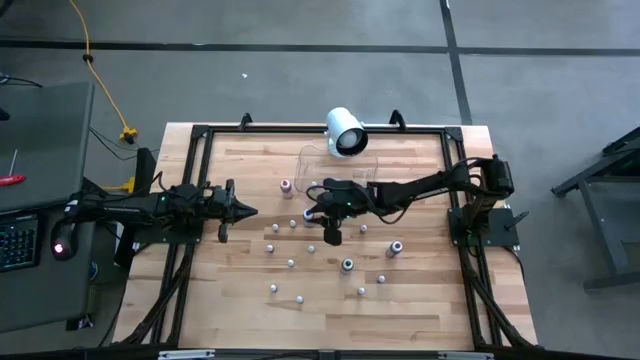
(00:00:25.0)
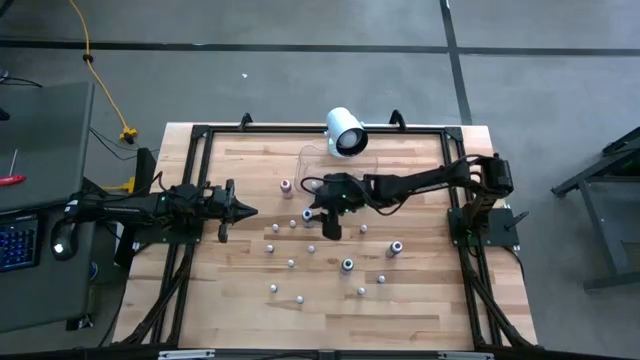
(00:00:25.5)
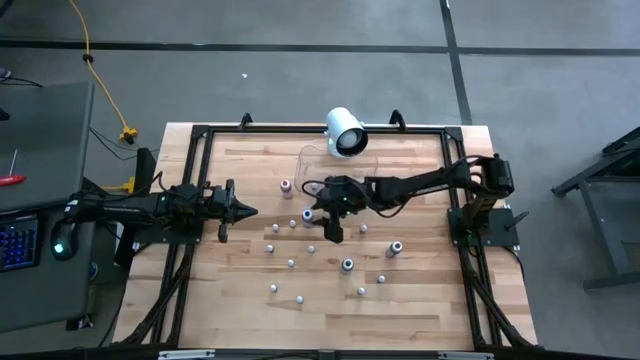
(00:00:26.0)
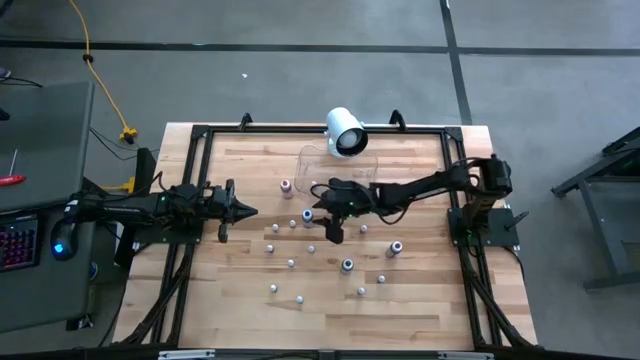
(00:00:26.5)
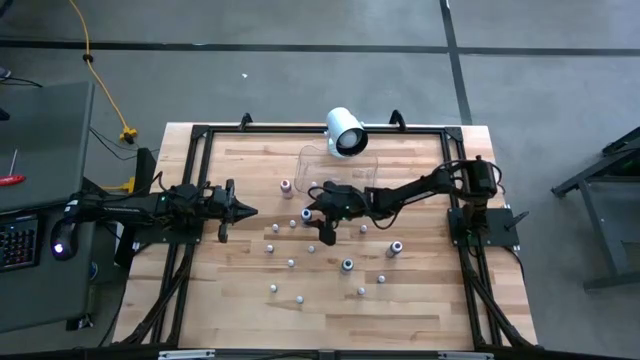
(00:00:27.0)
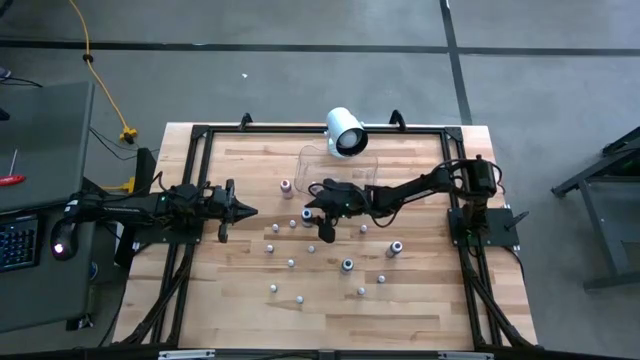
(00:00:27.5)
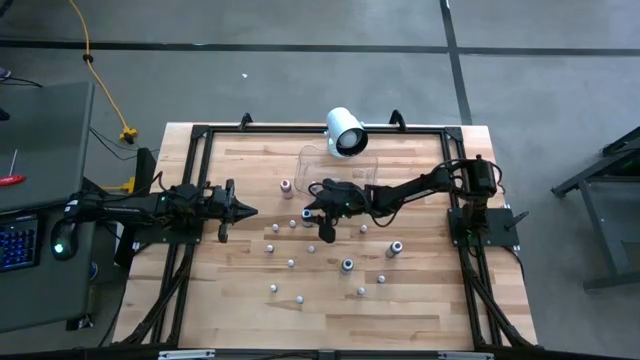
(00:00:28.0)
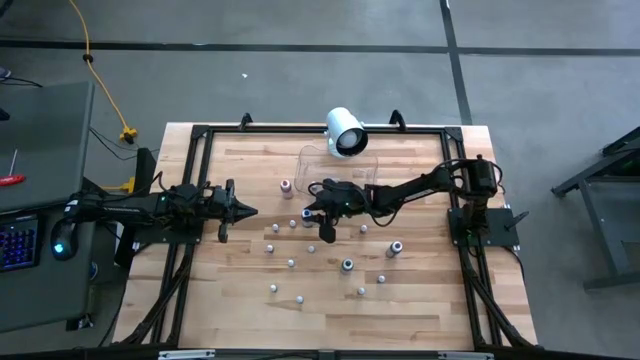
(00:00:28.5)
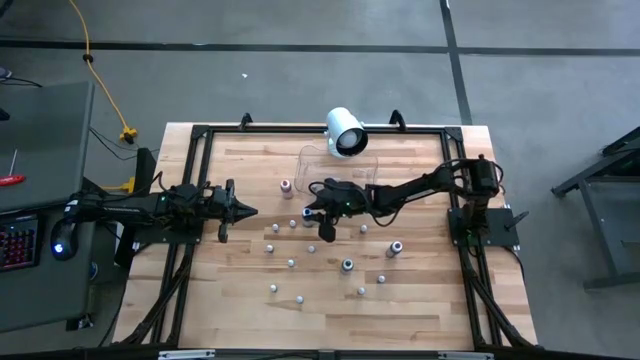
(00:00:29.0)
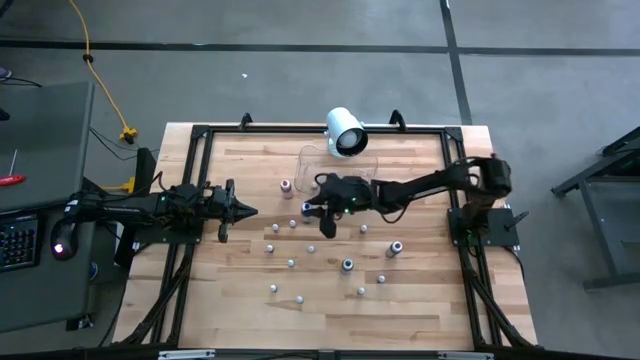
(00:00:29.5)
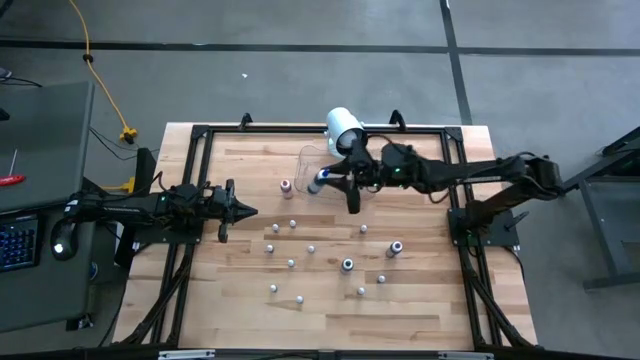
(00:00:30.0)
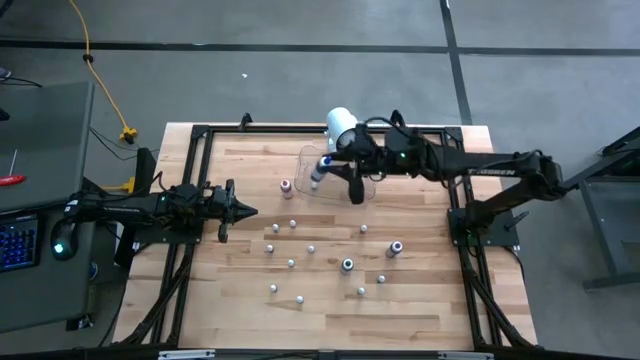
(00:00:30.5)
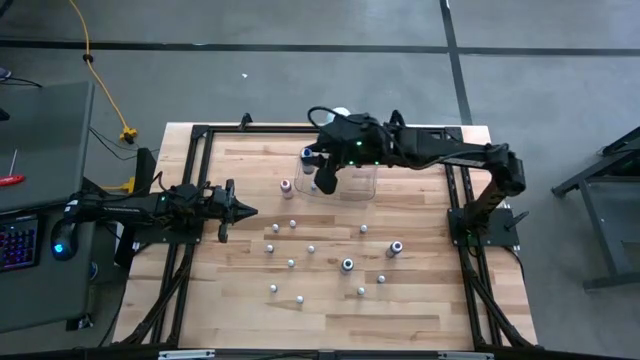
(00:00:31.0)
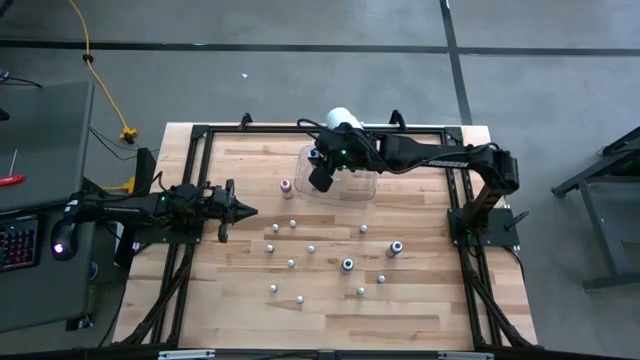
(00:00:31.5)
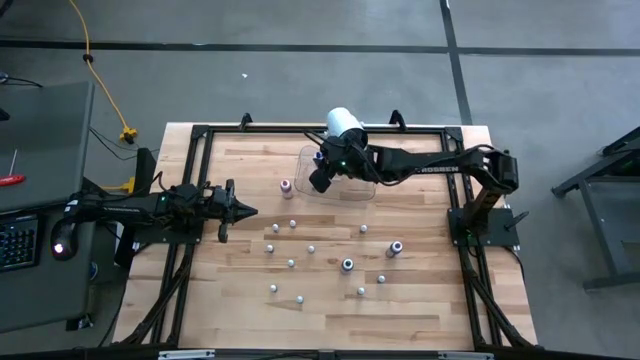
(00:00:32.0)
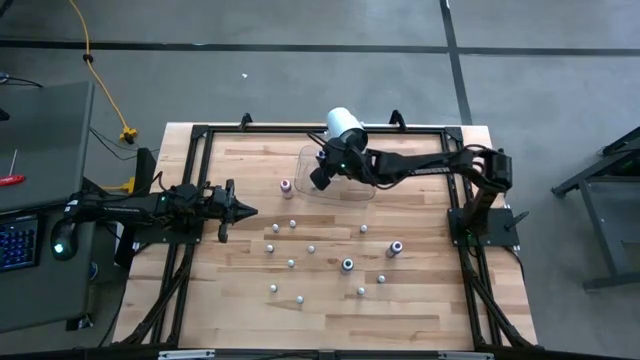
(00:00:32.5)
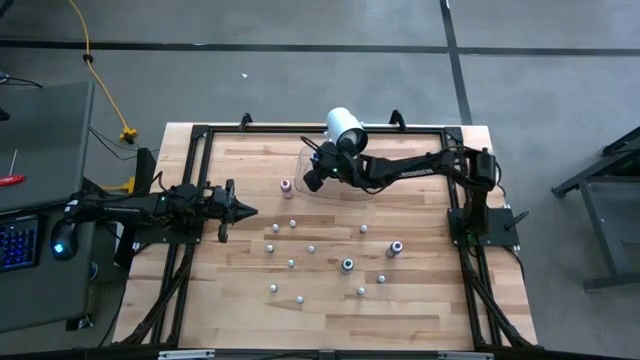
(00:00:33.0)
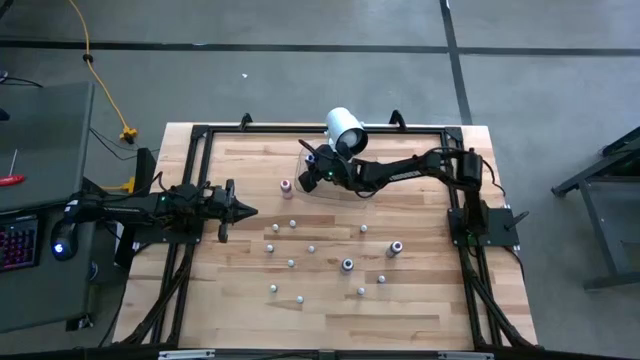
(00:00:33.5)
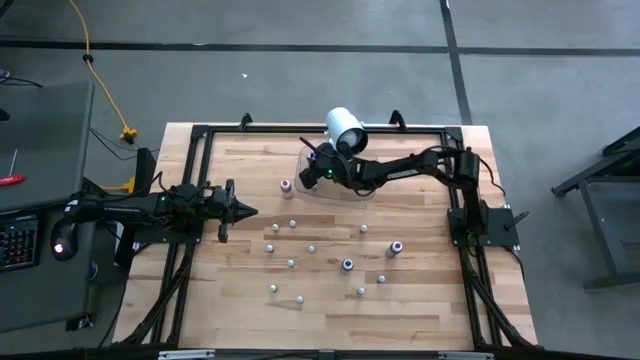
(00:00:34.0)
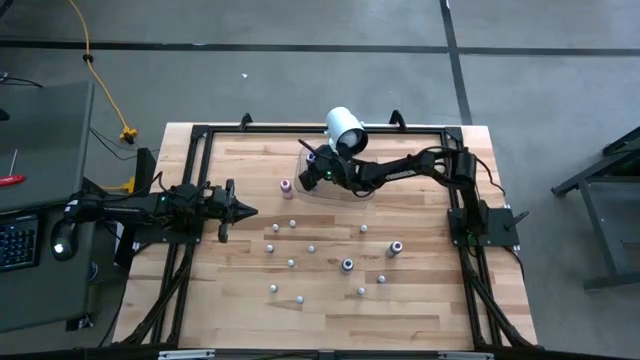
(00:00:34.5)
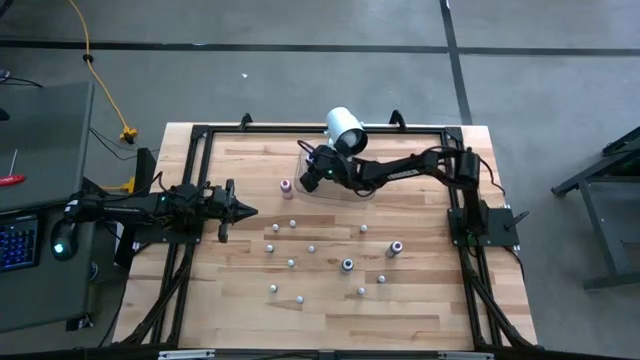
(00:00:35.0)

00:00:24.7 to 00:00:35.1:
Task: Pick & Place food coloring
Put the large blue food coloring bottle into the transparent bin

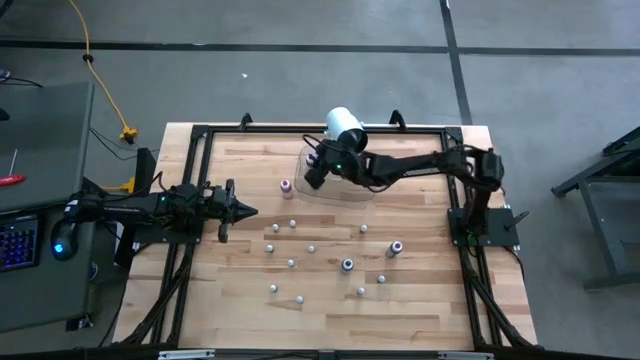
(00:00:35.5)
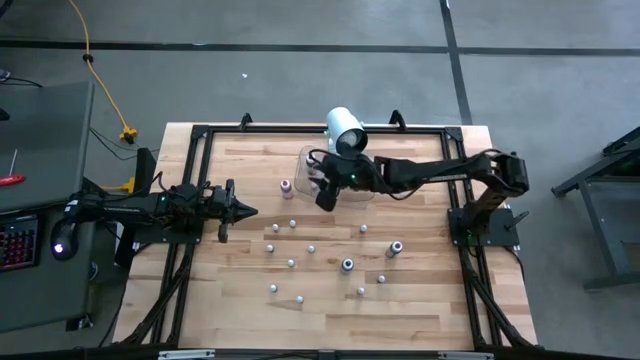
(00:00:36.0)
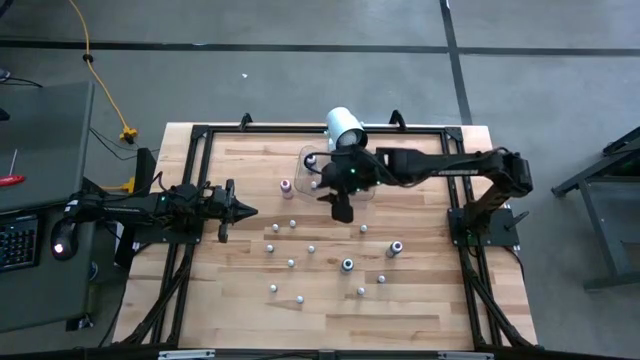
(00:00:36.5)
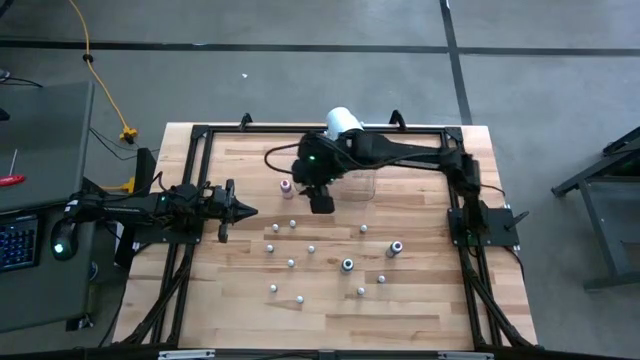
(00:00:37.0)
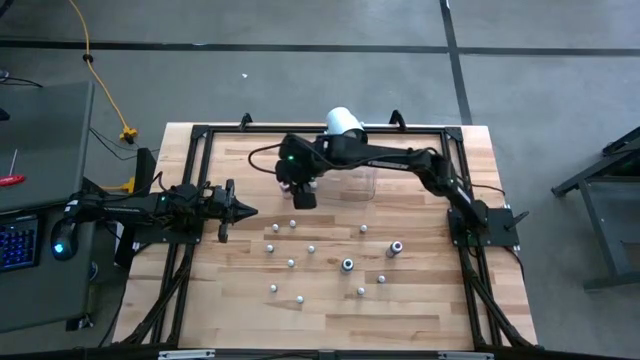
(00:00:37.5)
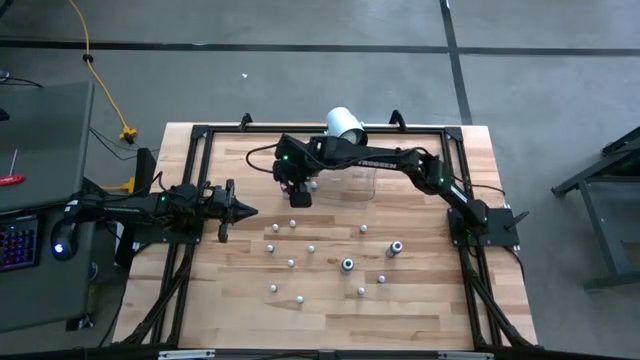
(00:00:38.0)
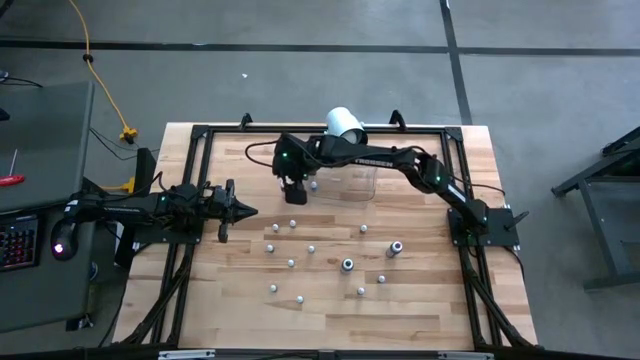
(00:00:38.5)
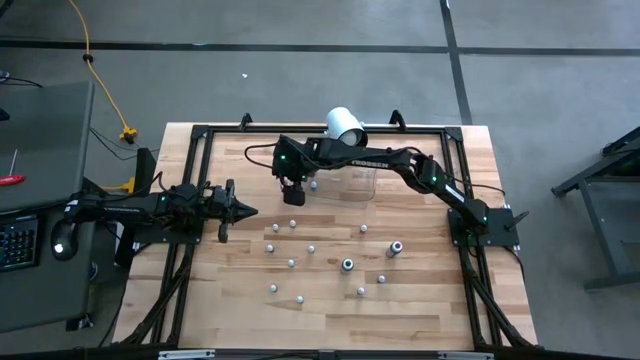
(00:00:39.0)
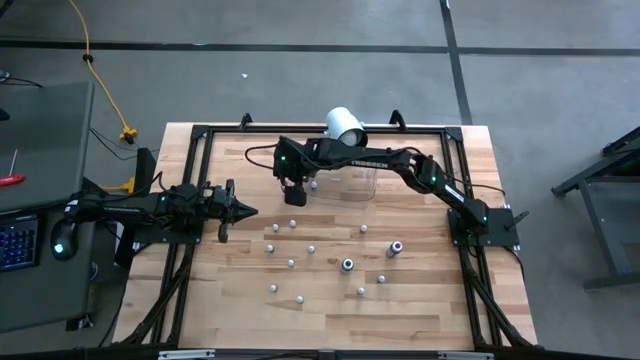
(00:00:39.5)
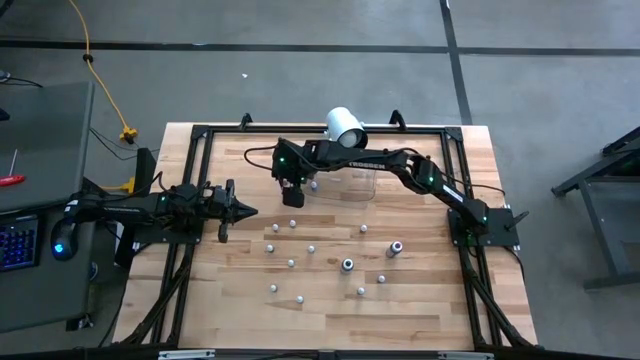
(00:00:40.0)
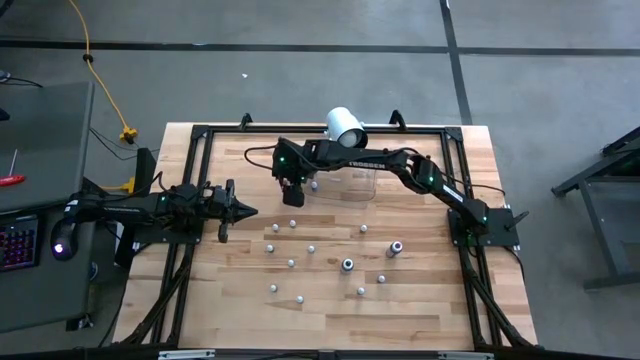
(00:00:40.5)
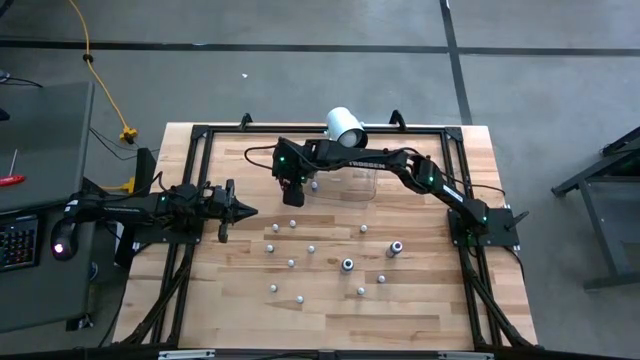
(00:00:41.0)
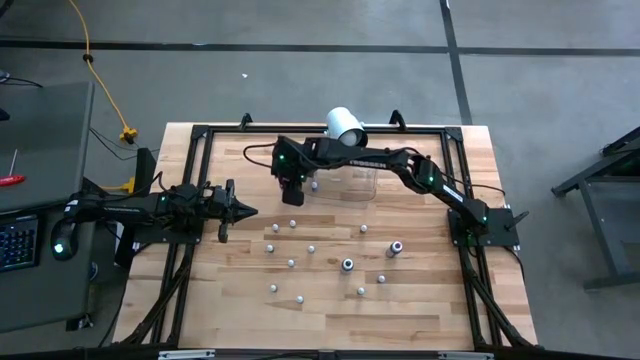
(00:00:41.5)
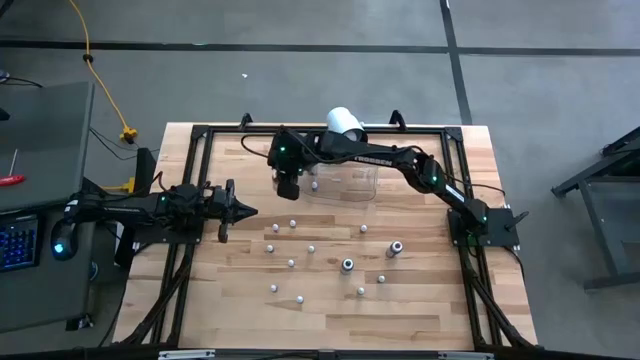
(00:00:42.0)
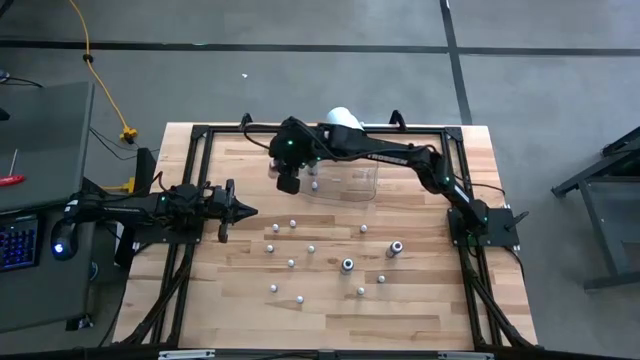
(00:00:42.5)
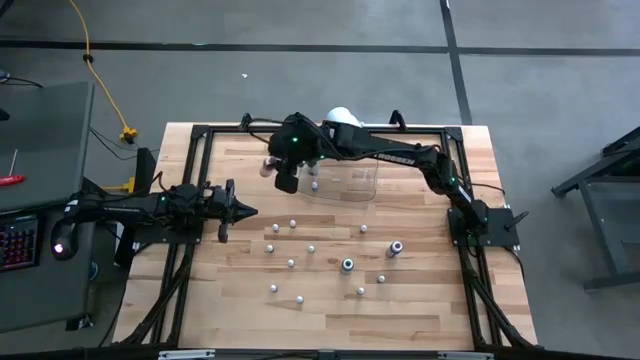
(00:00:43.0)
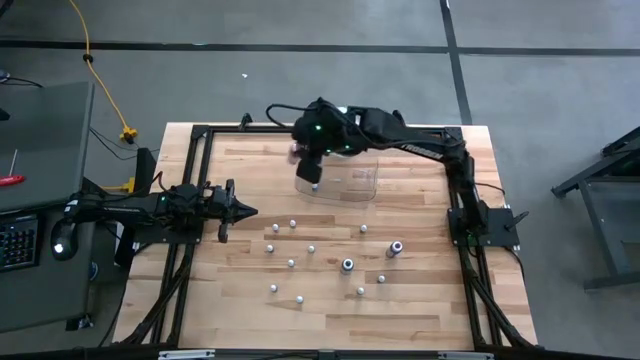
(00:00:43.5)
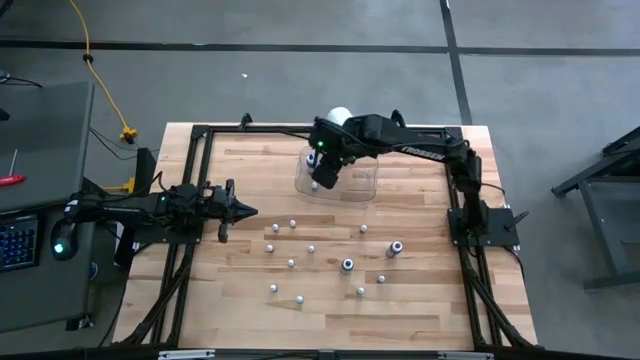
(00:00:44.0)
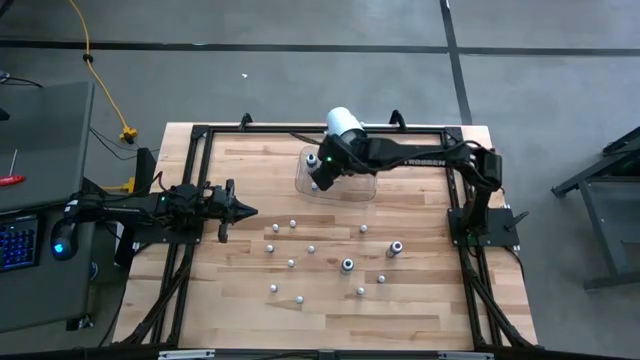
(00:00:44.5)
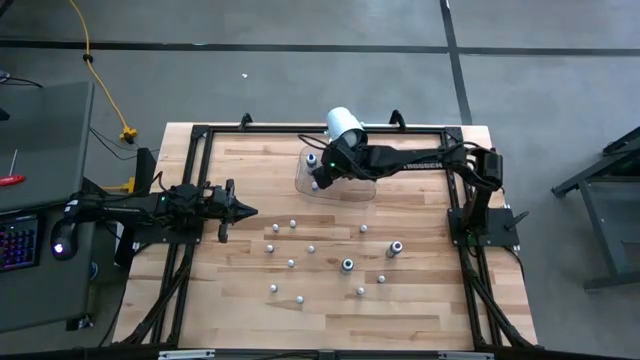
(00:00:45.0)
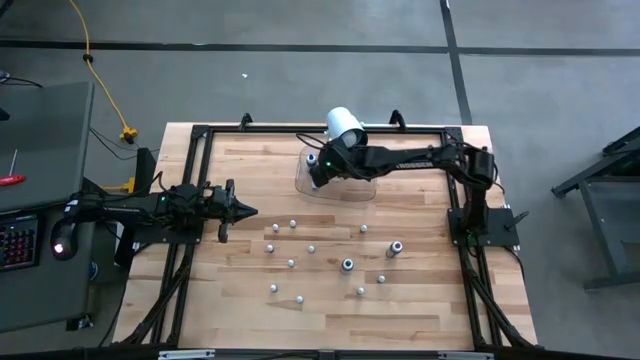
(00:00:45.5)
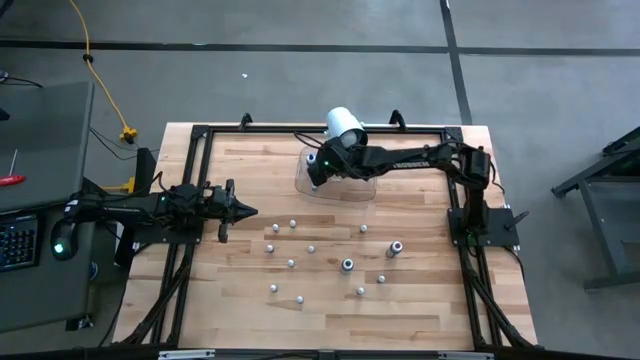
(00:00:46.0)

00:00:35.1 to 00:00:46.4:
Put the large pink food coloring bottle into the transparent bin
